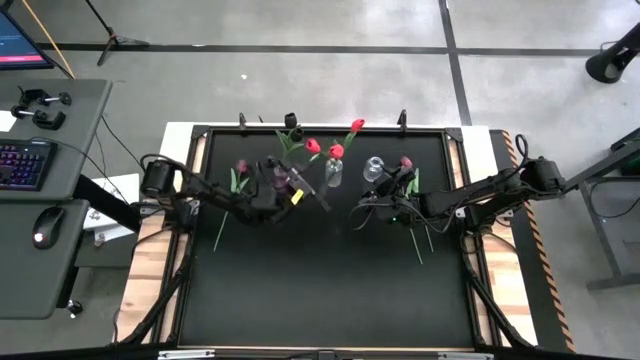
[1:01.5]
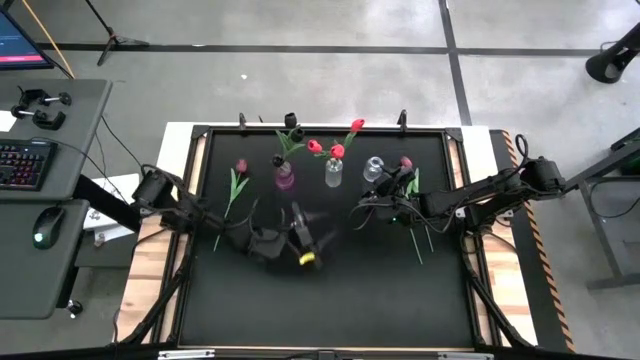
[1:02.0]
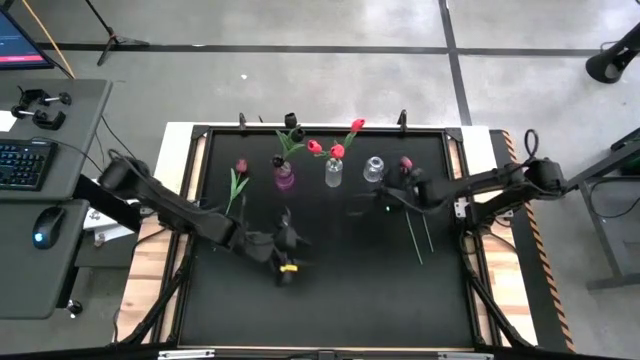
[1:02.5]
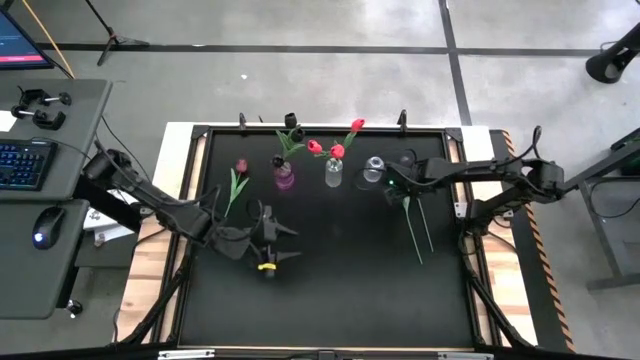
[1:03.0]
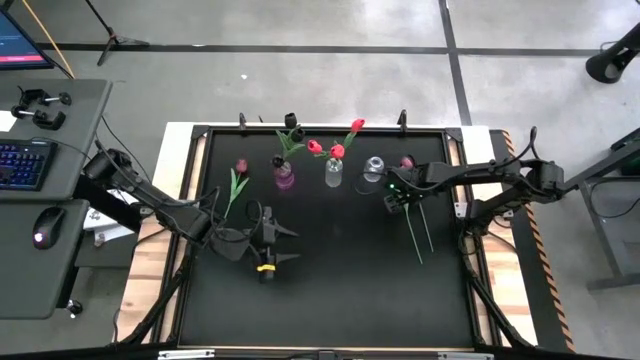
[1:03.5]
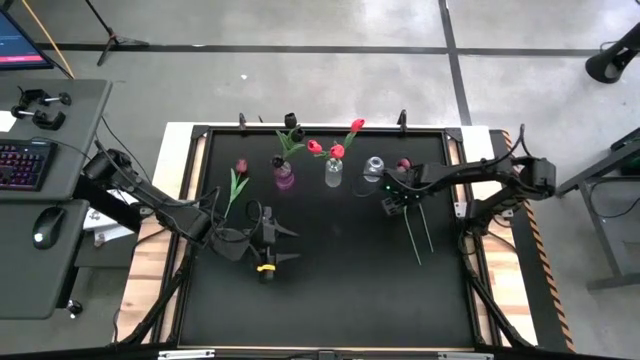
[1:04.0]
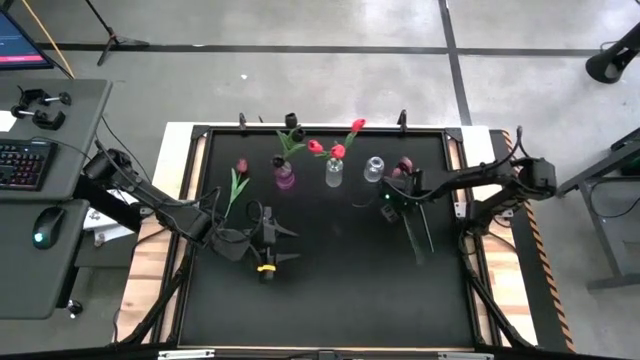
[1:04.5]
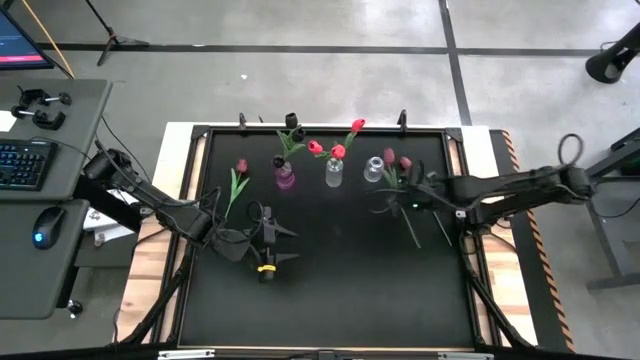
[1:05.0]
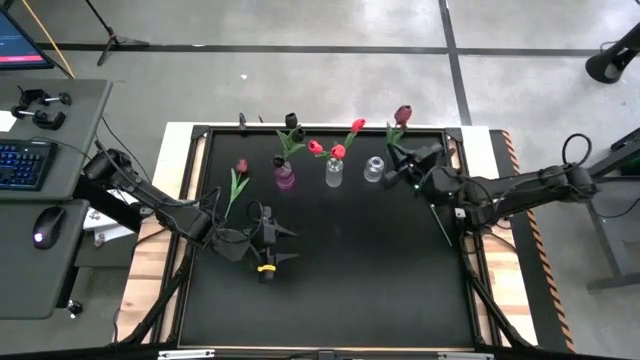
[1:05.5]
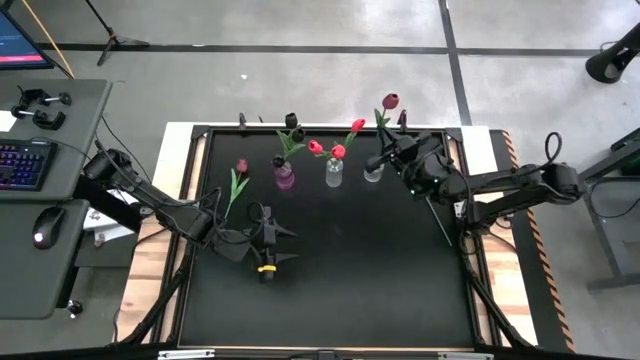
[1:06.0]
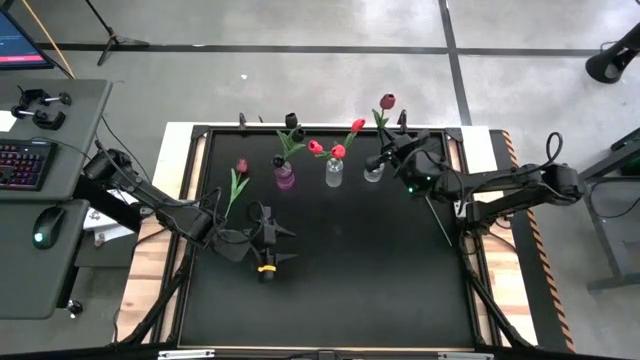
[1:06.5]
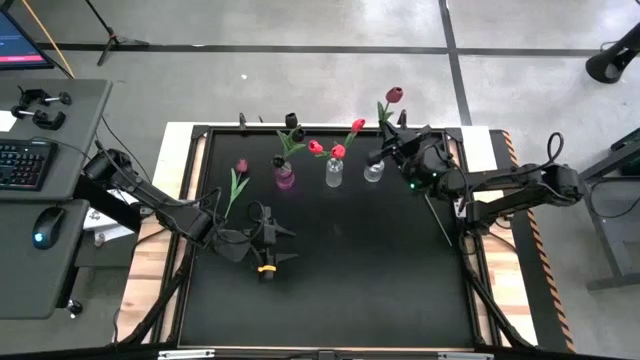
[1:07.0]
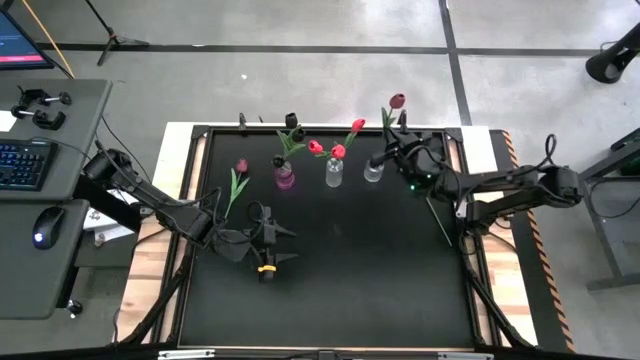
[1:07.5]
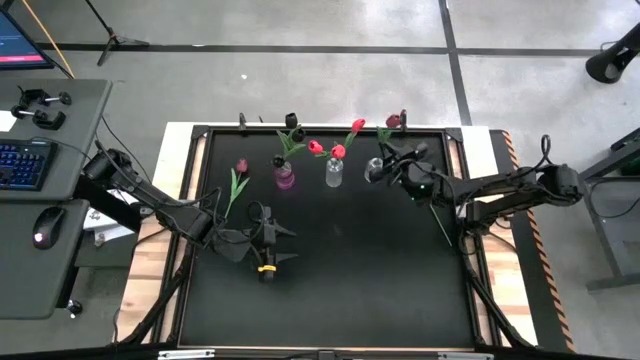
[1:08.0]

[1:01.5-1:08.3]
Task: Sort flowers into vase by color
Put the center red tulip into the right transparent vase

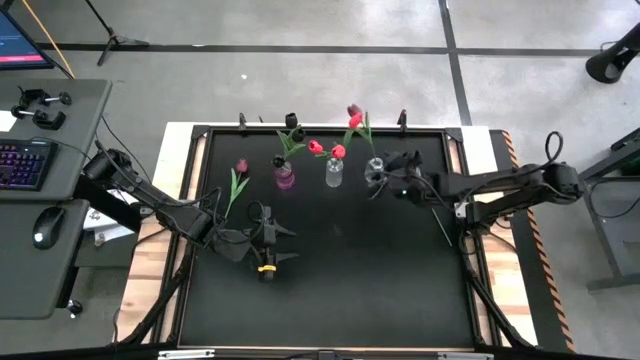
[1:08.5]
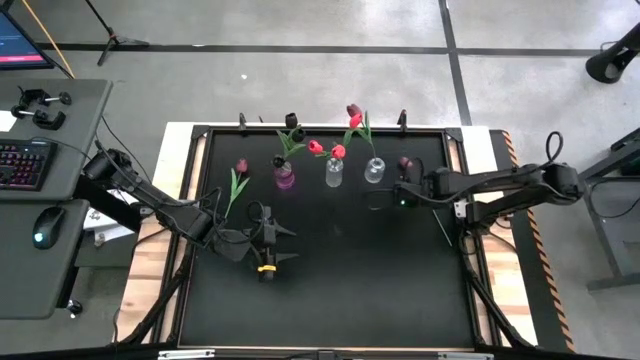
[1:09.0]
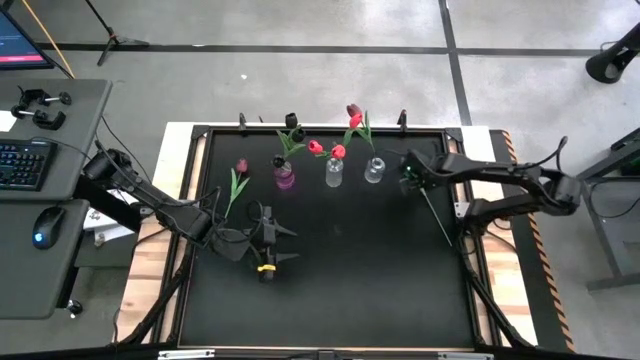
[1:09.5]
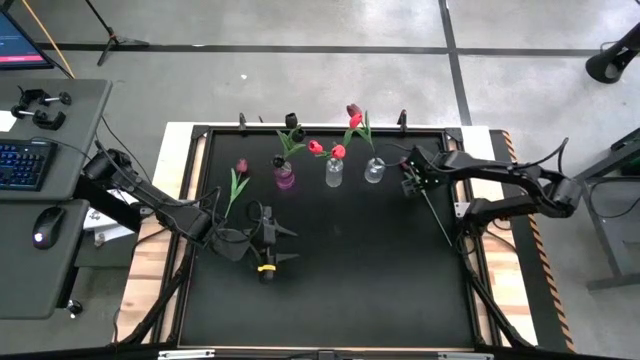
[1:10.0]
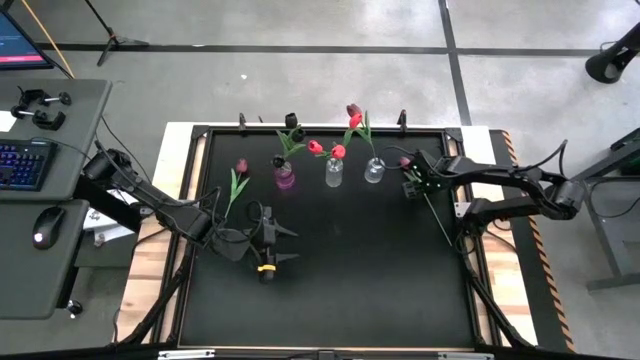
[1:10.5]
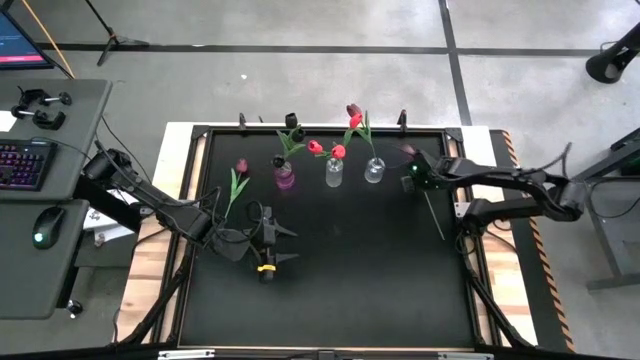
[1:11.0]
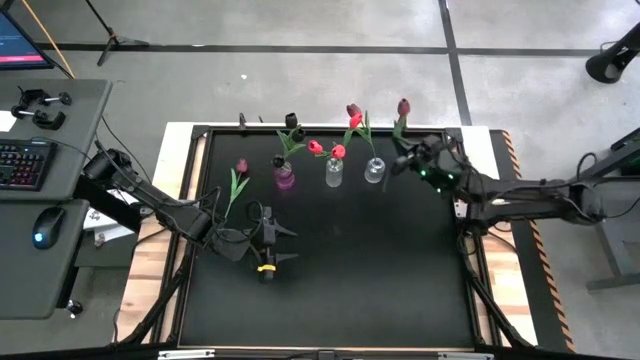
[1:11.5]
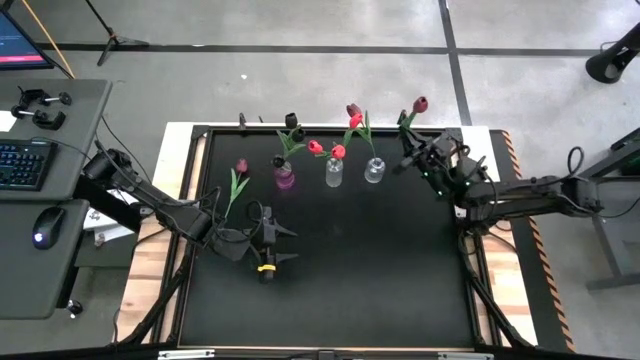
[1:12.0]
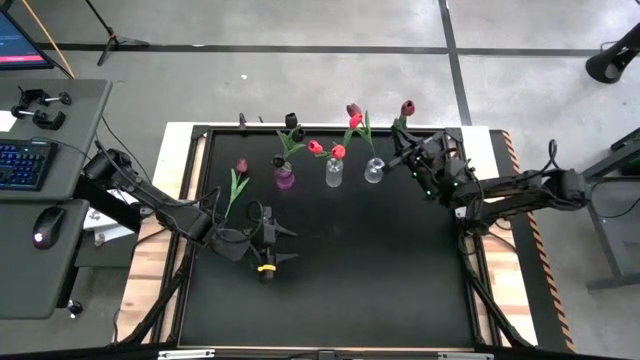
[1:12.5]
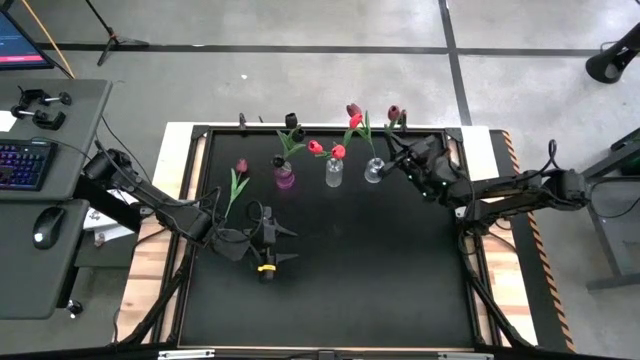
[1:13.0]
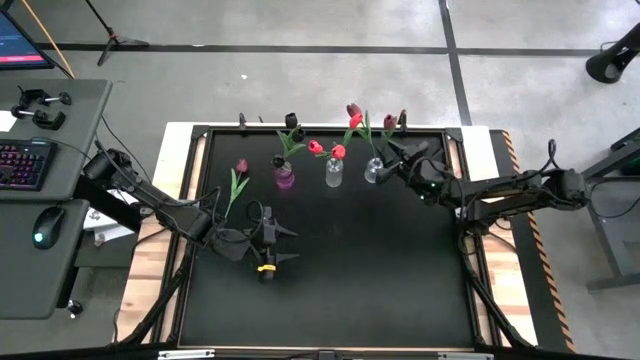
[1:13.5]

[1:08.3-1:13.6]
Put the right red tulip into the right transparent vase

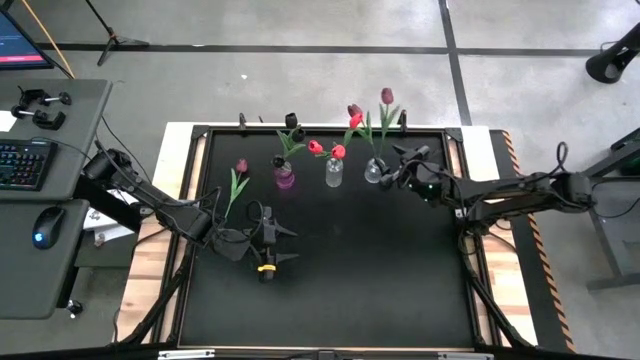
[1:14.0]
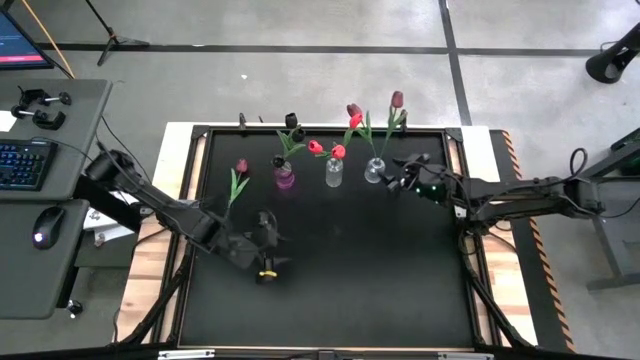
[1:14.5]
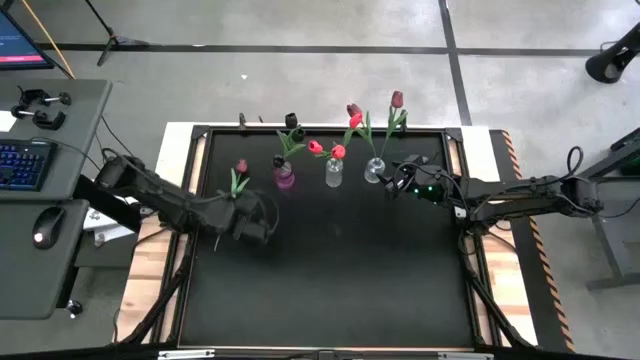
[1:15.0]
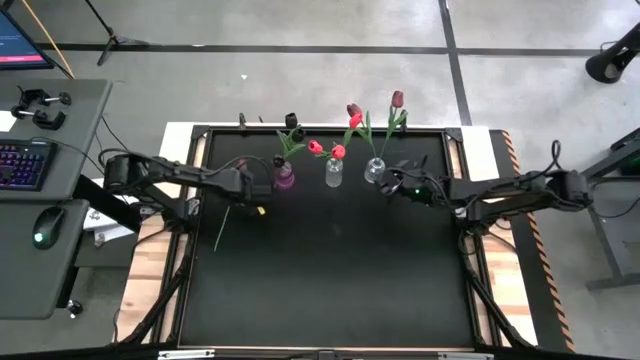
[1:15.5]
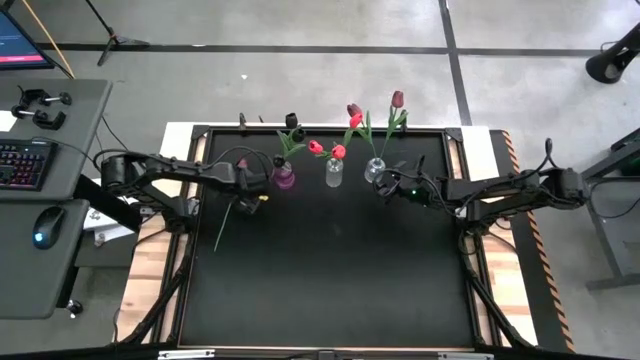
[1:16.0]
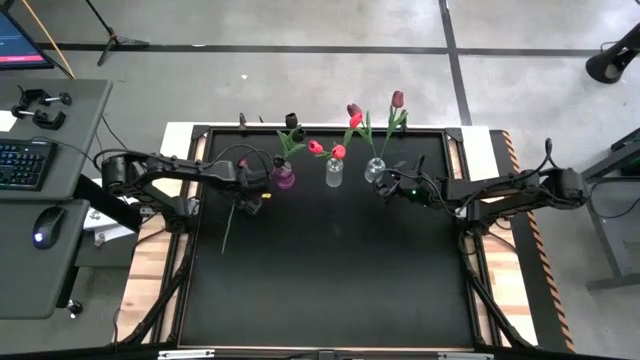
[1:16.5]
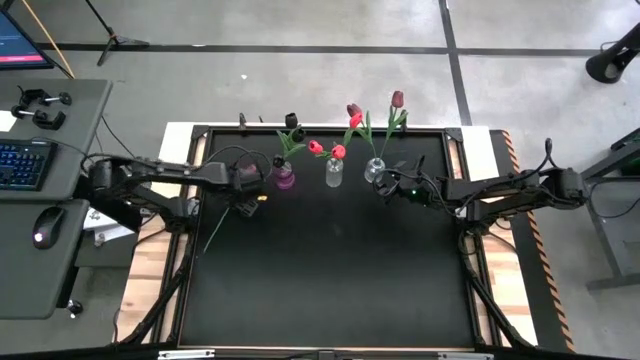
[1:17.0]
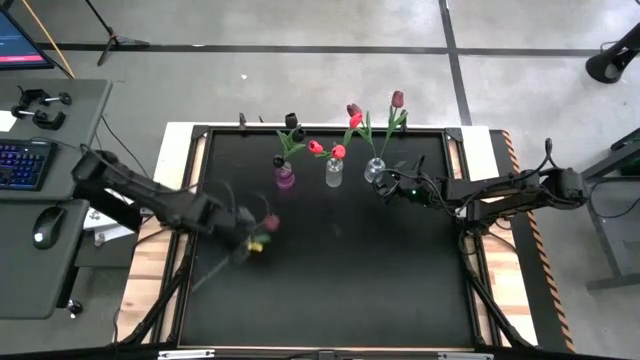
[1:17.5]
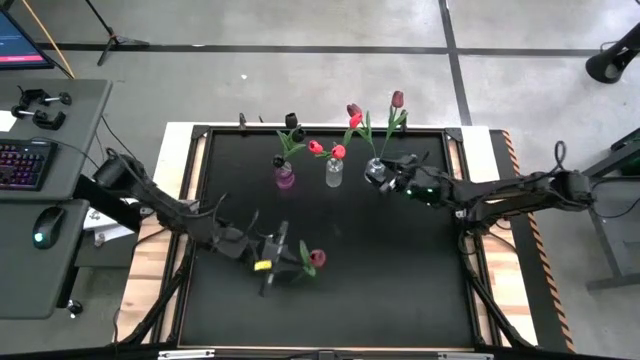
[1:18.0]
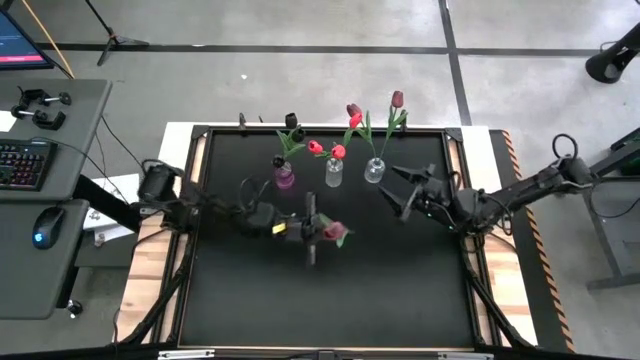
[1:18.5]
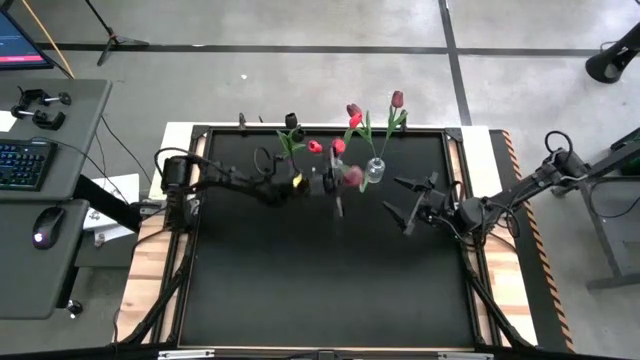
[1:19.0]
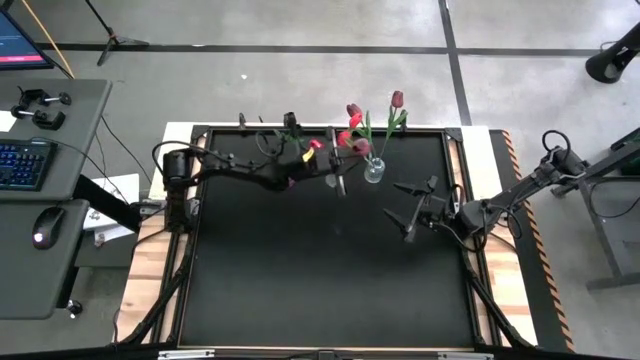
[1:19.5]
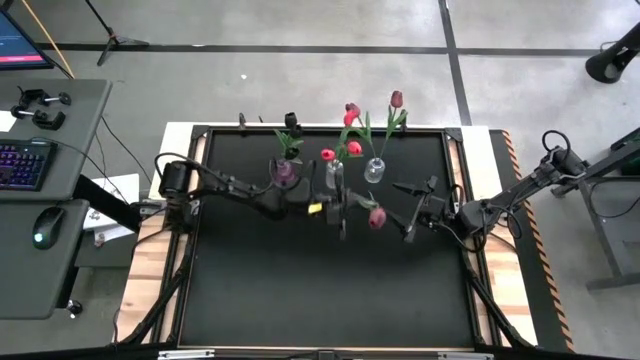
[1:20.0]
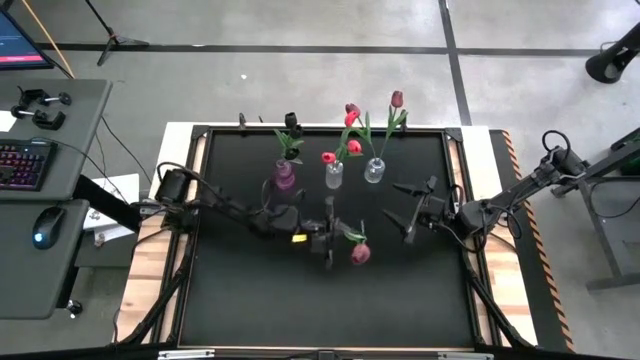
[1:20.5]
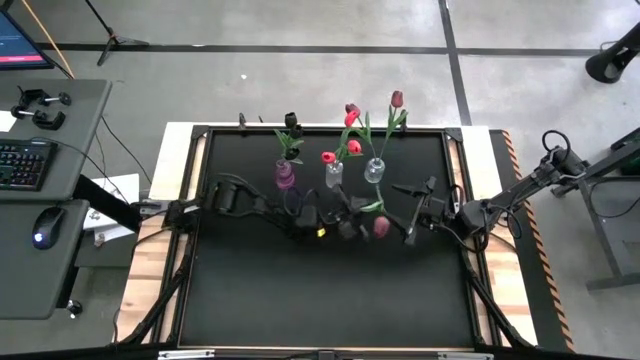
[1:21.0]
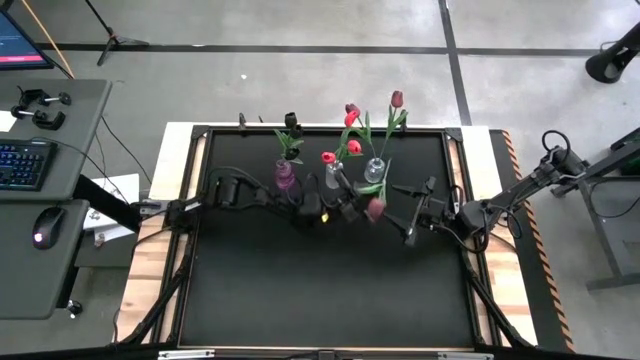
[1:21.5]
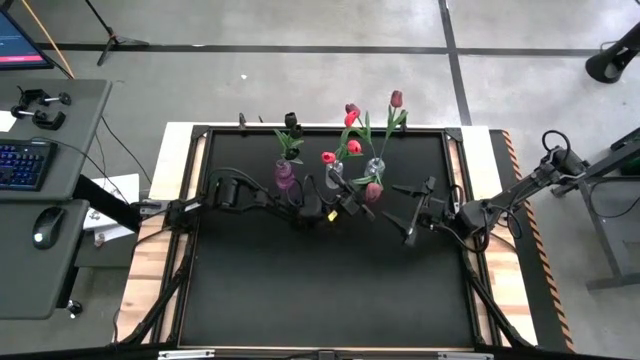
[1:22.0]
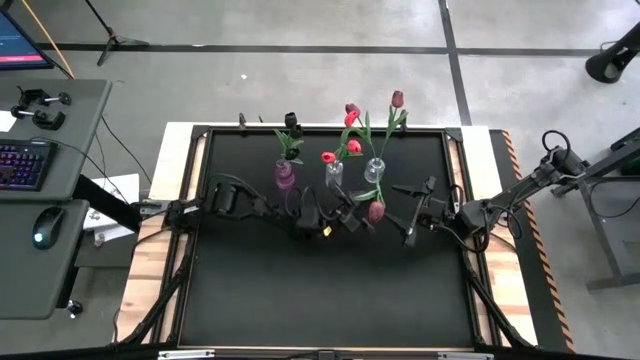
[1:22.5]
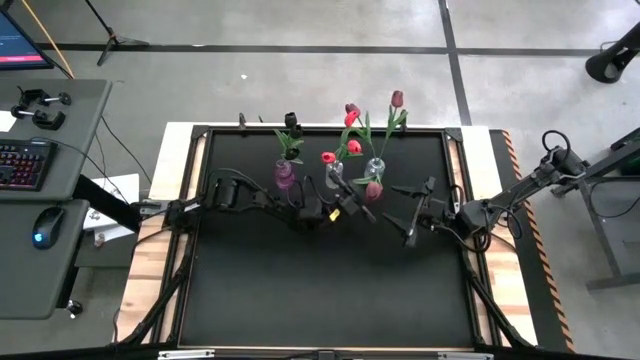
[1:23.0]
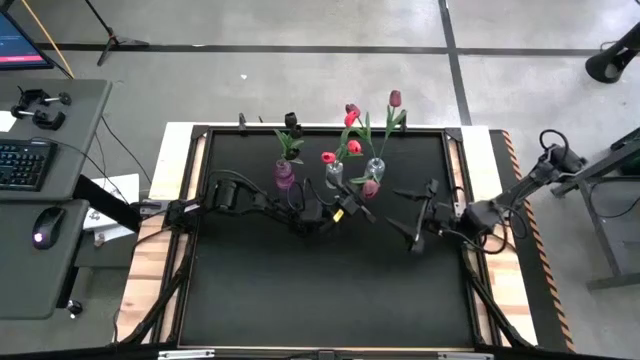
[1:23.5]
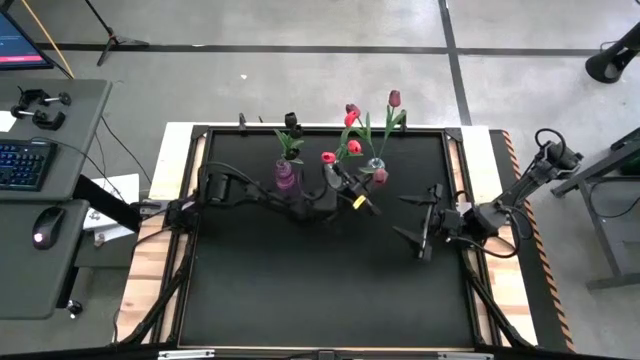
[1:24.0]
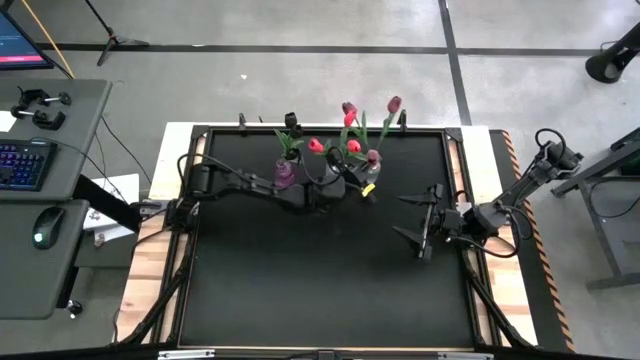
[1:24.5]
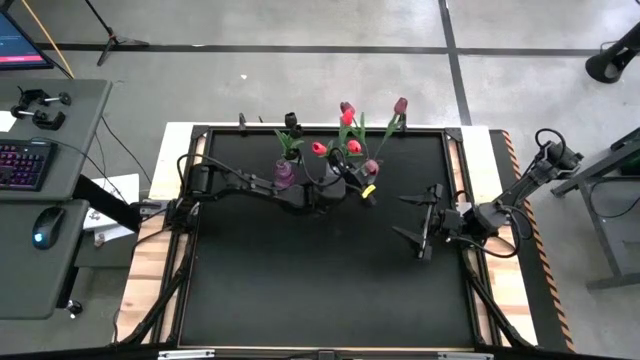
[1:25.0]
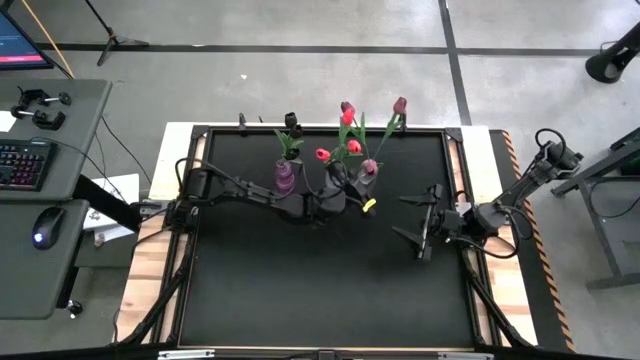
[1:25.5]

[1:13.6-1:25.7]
Put the red tulip into the right transparent vase
